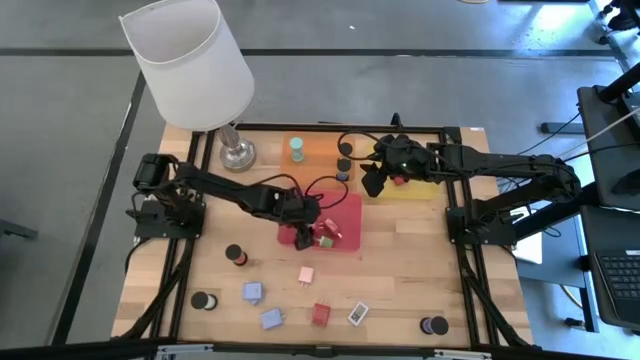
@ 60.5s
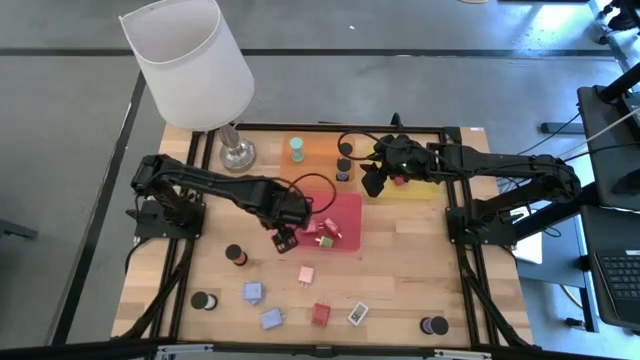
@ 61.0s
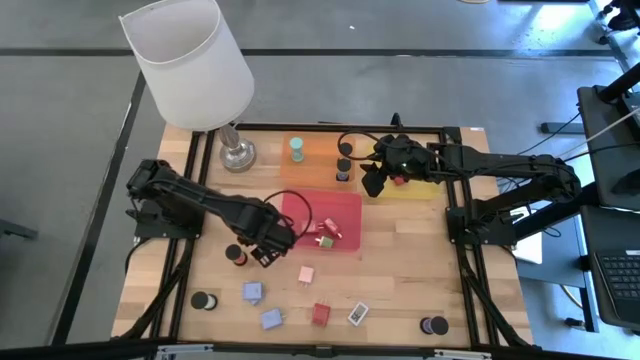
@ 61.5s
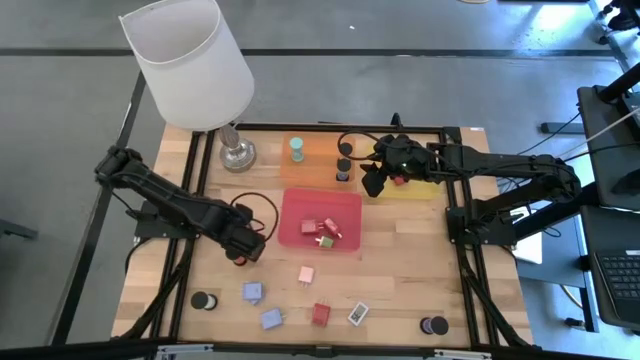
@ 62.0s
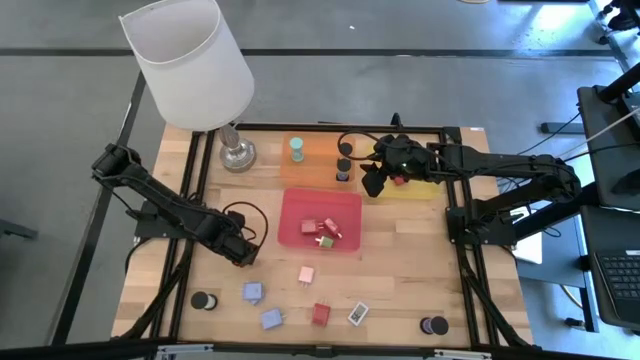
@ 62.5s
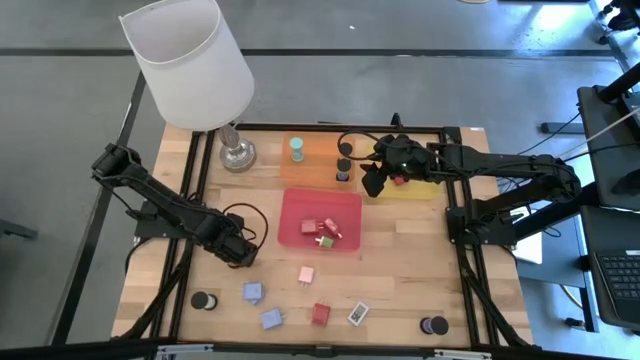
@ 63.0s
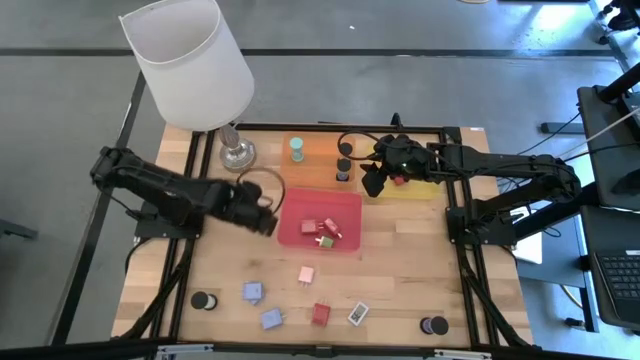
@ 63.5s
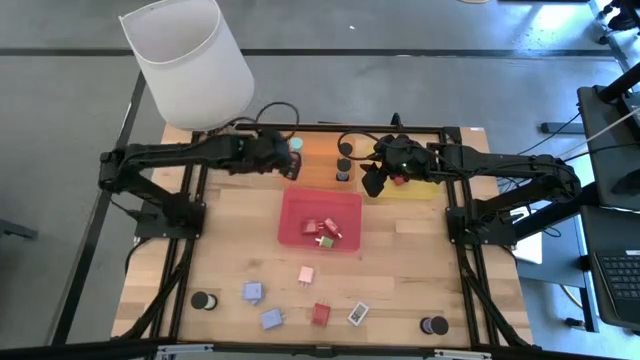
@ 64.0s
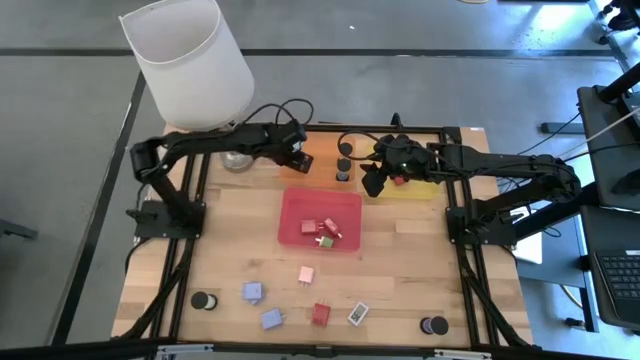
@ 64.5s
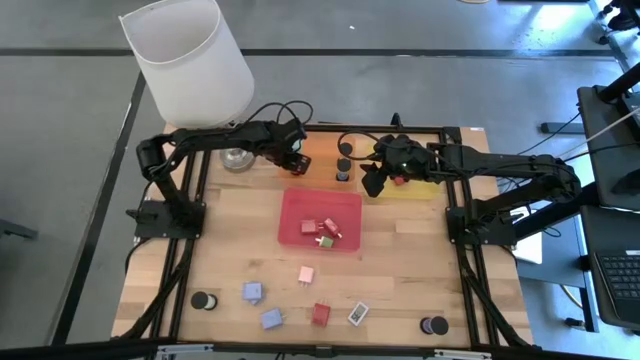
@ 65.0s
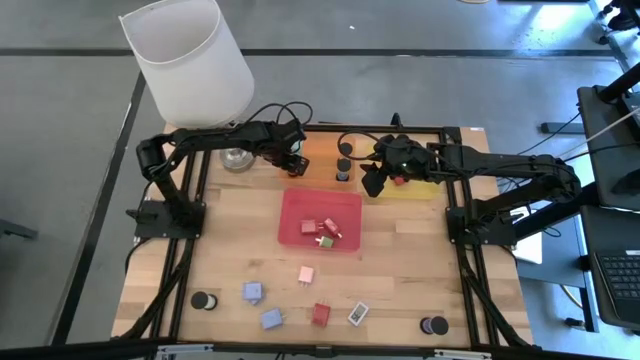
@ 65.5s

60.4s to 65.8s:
Task: Pick & Place Office items
Put the red black hourglass into the orange bin

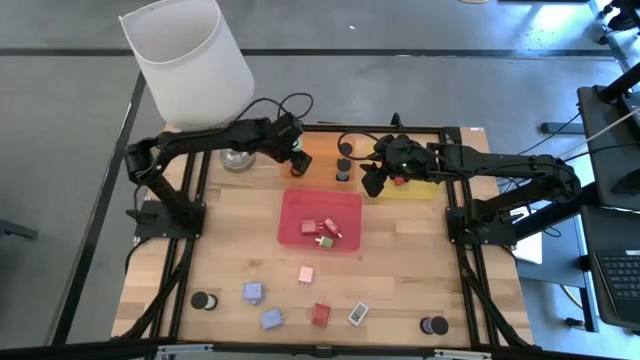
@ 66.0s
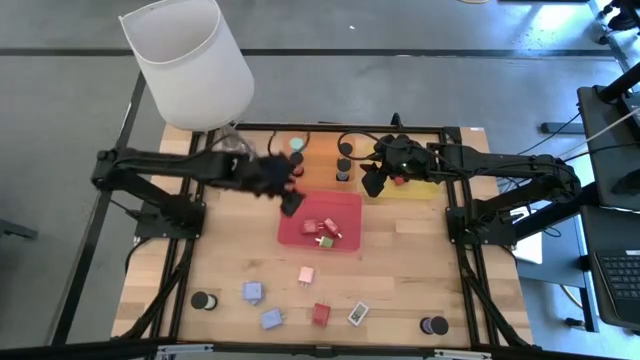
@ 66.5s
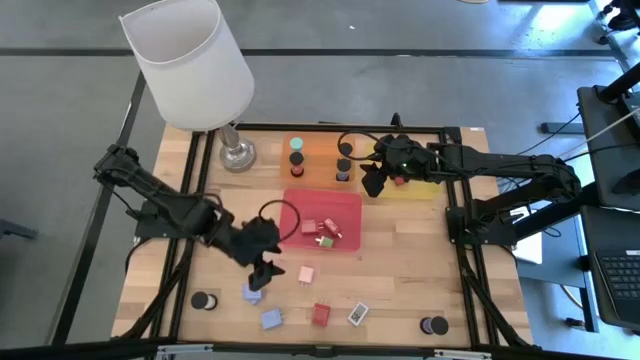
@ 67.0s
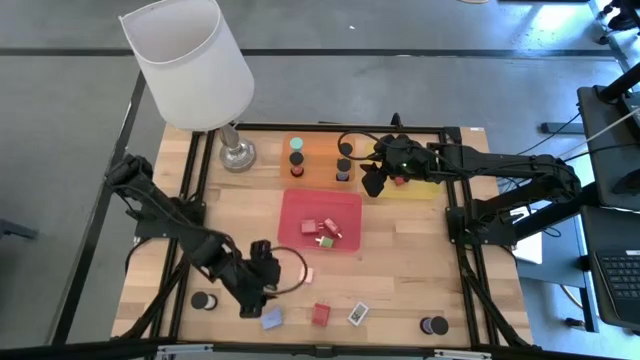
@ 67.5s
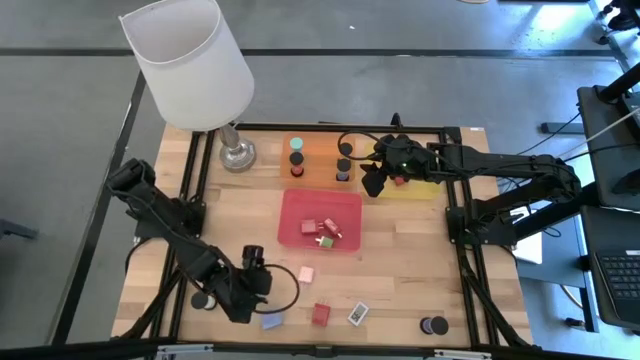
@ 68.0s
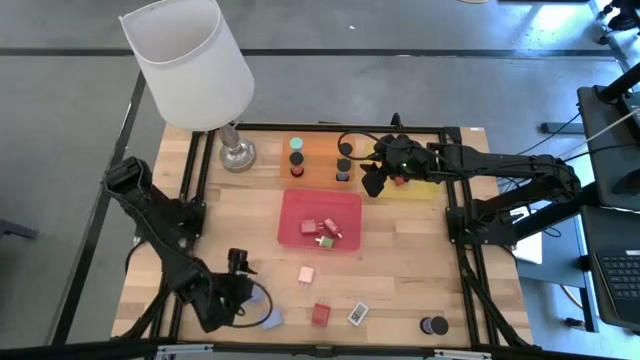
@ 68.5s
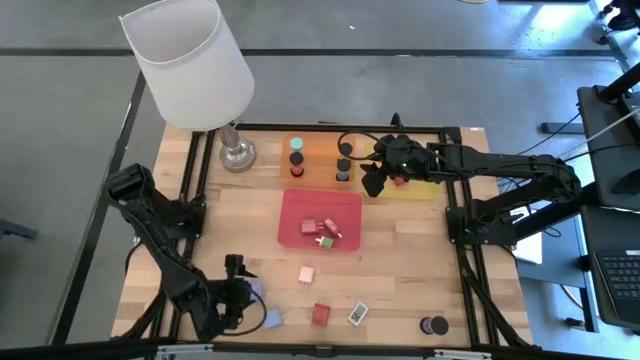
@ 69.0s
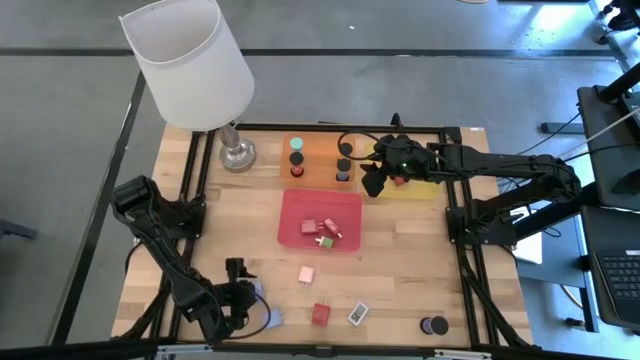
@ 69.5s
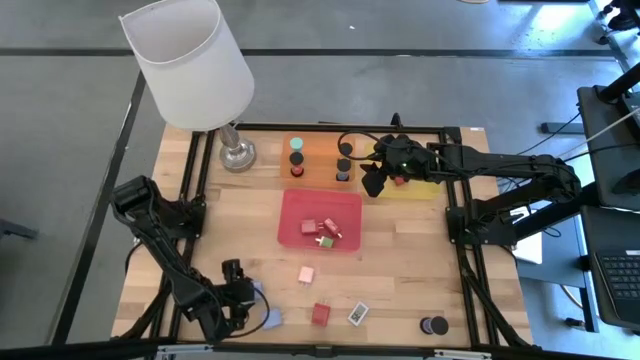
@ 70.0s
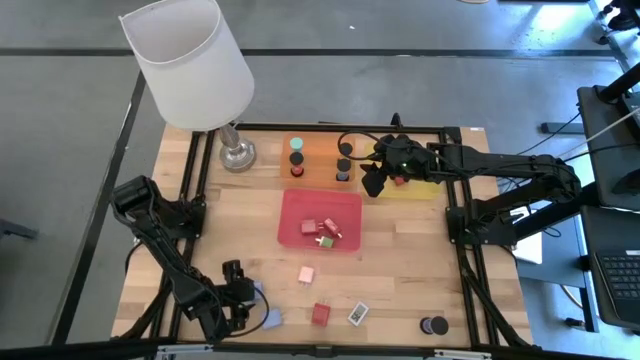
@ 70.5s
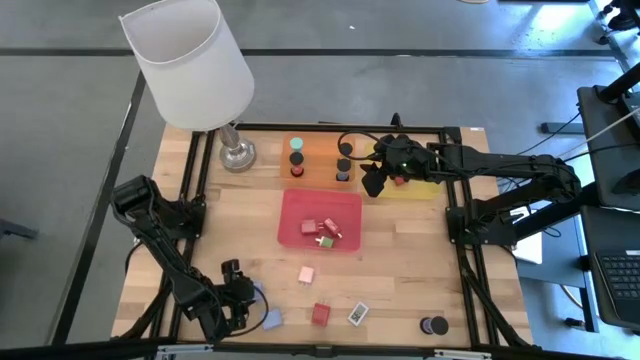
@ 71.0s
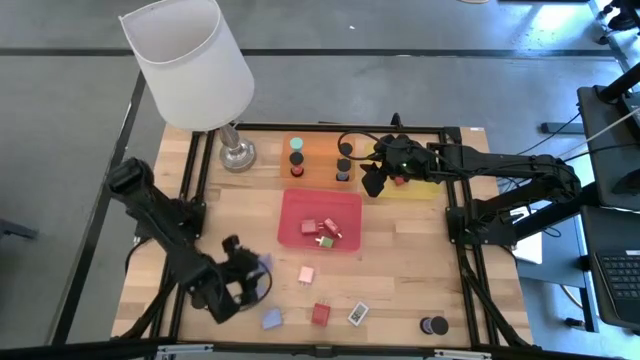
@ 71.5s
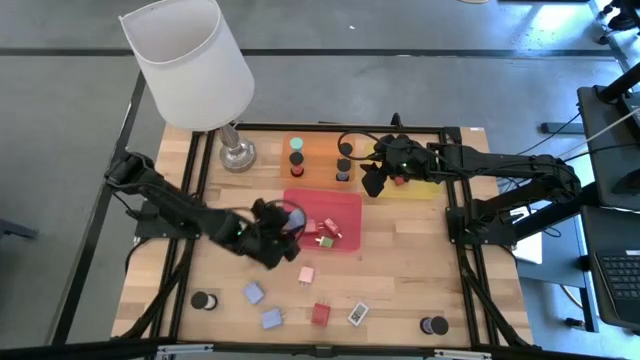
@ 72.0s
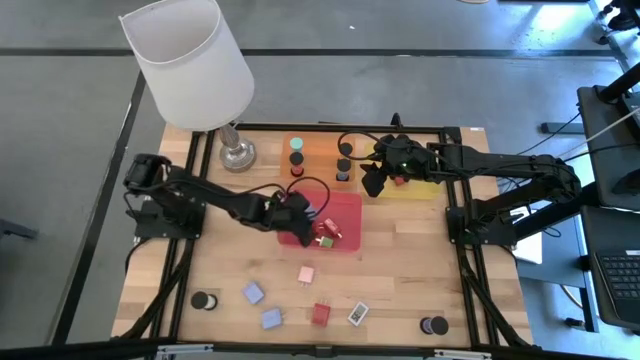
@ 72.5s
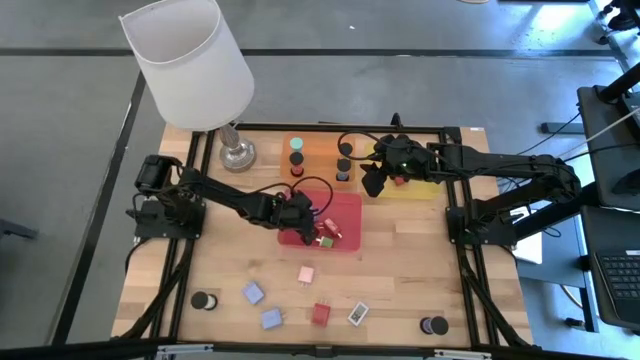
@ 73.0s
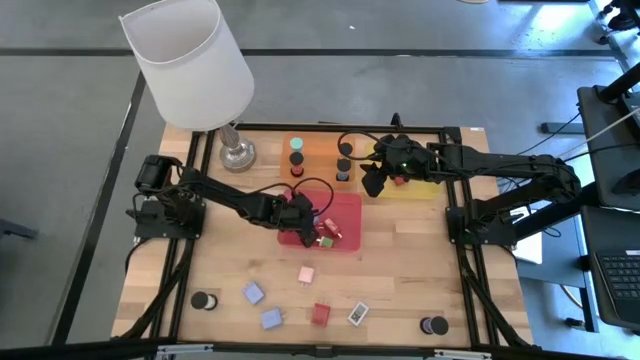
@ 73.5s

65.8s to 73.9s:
Put the top light blue charger adapter into the red bin

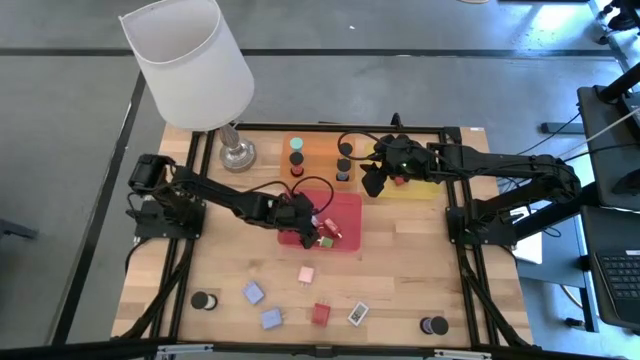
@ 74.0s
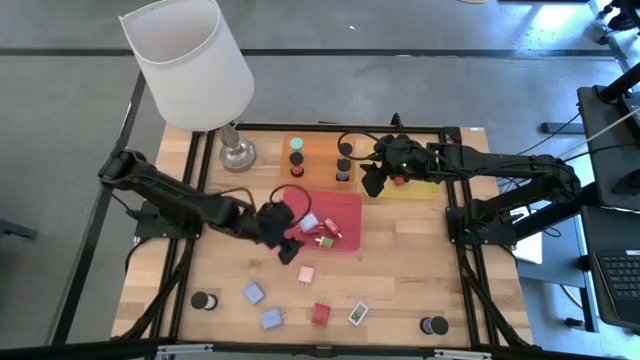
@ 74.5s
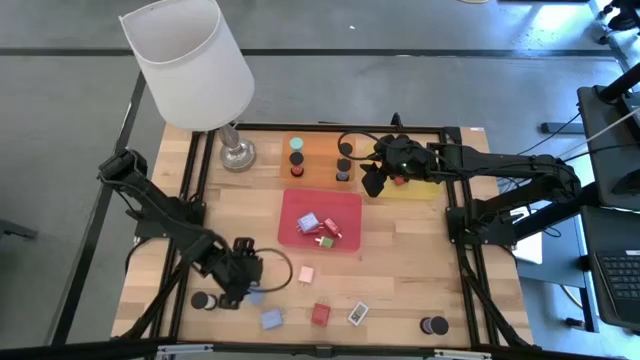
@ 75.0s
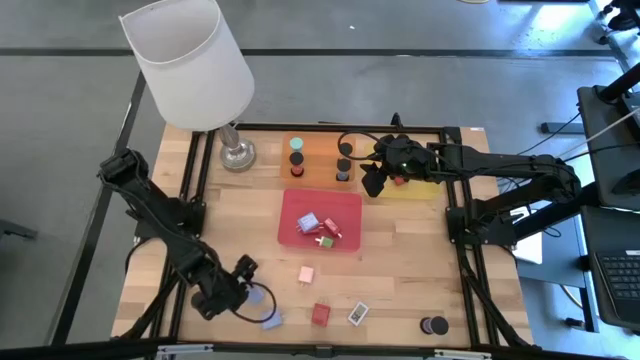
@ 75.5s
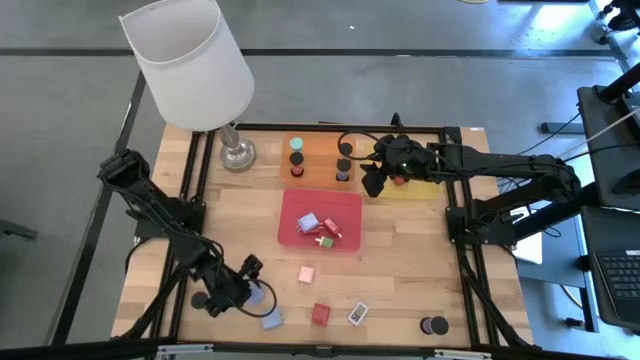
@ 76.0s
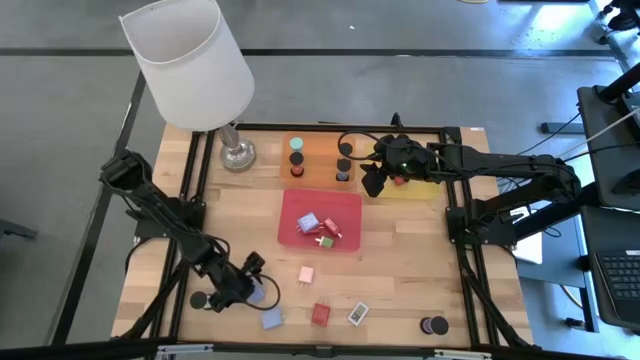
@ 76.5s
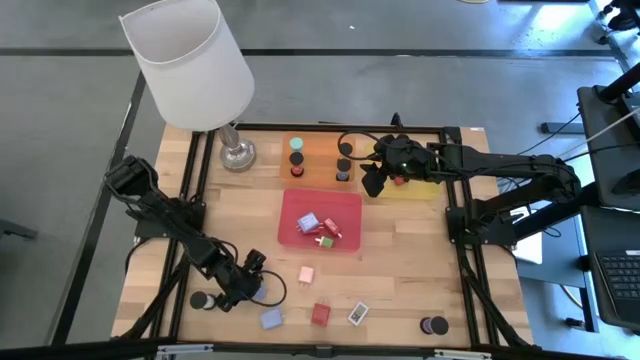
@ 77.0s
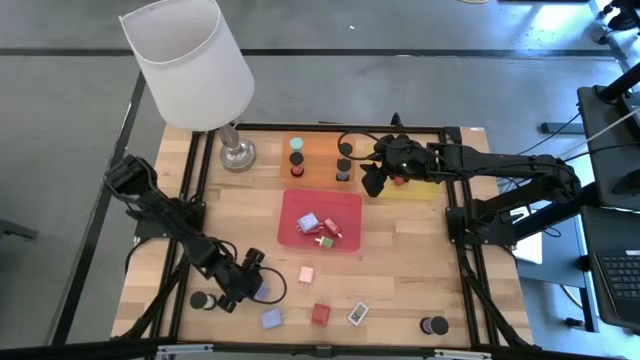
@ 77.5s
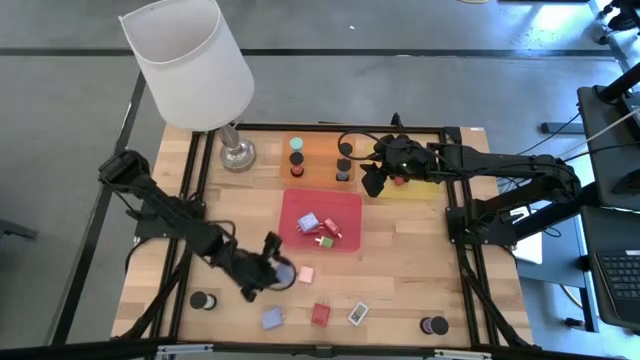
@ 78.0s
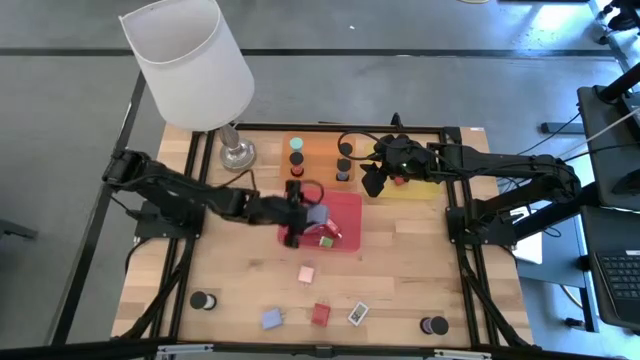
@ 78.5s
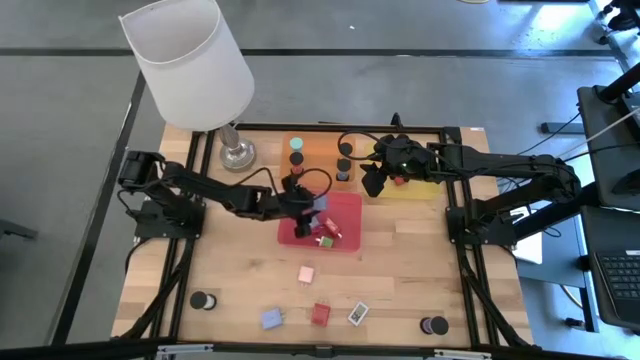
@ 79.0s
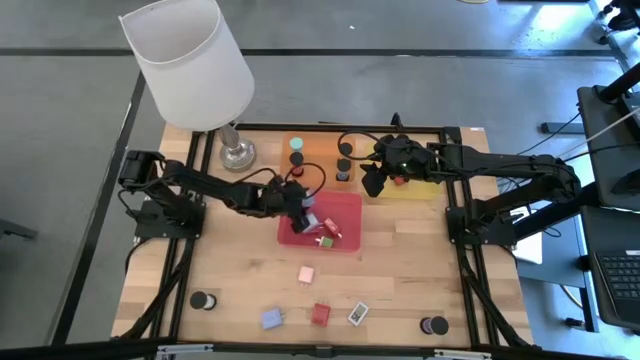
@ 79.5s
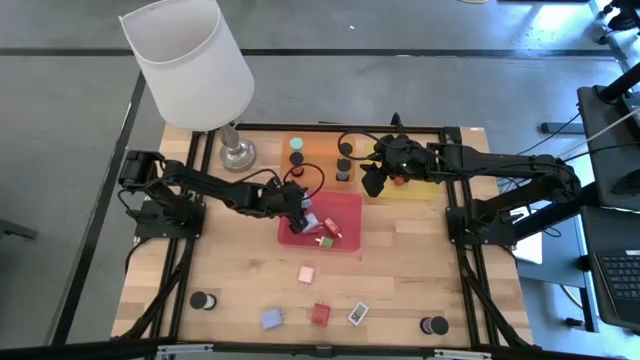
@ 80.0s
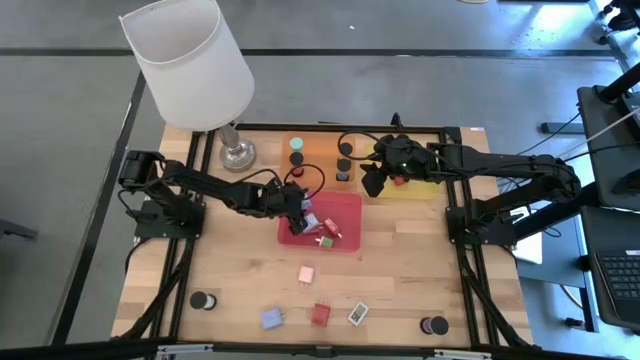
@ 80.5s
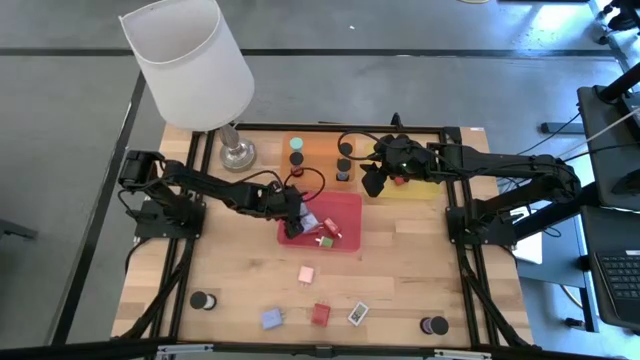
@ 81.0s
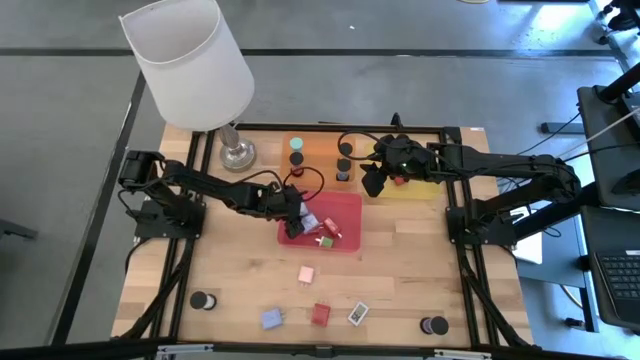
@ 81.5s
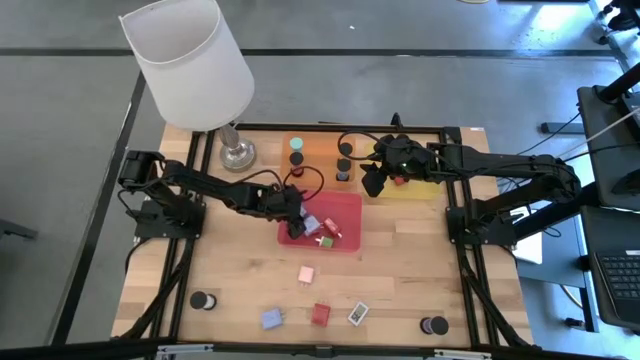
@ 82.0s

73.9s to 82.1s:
Put the top light blue charger adapter into the red bin
